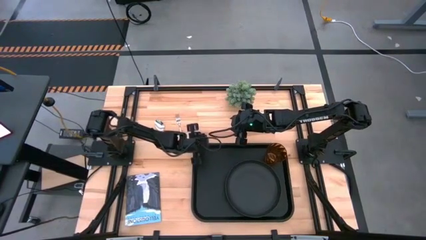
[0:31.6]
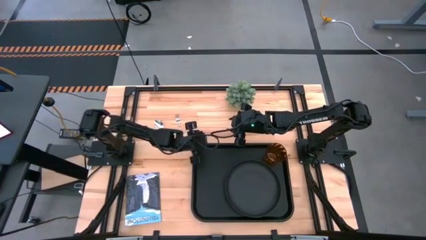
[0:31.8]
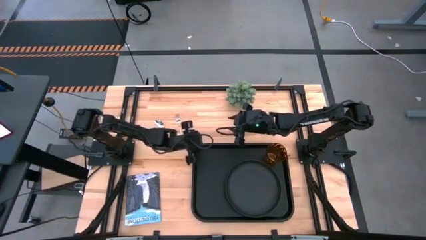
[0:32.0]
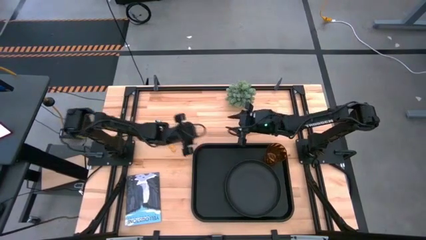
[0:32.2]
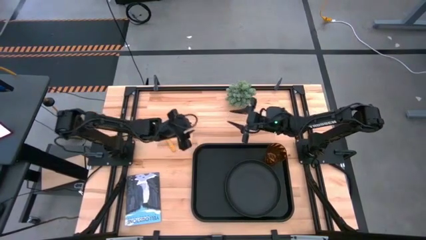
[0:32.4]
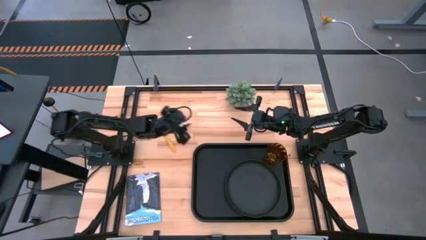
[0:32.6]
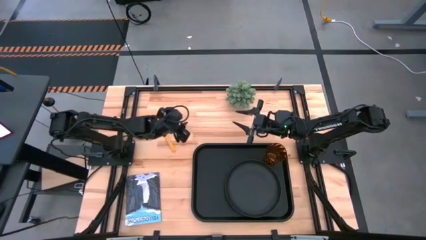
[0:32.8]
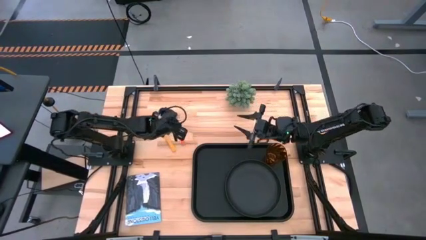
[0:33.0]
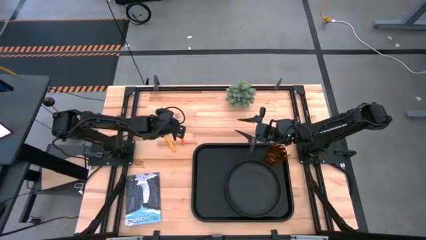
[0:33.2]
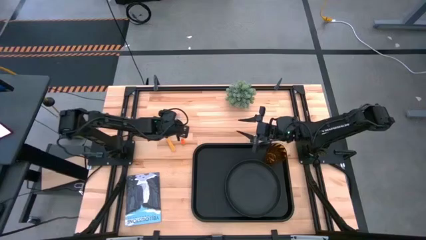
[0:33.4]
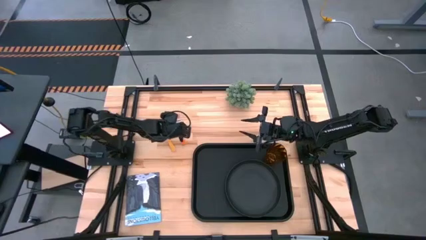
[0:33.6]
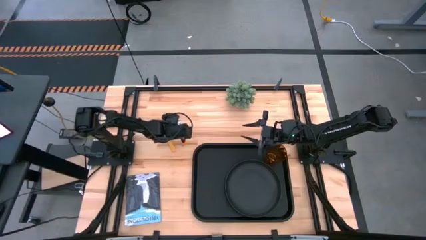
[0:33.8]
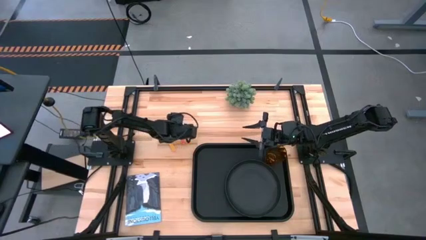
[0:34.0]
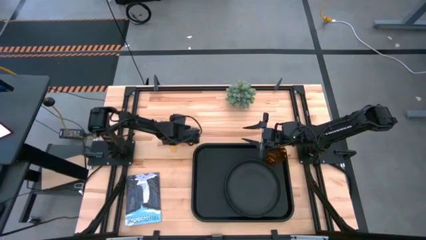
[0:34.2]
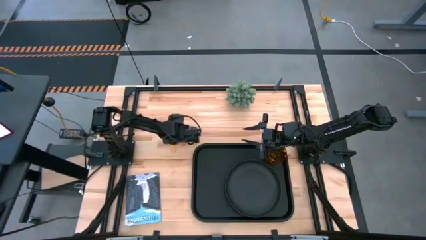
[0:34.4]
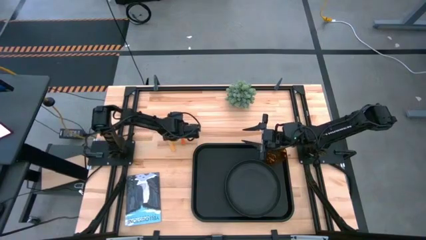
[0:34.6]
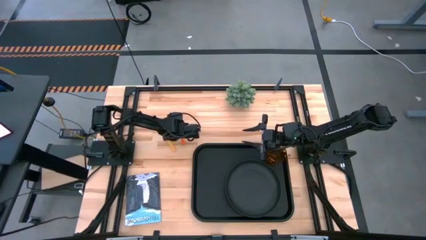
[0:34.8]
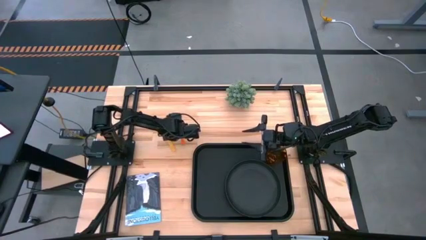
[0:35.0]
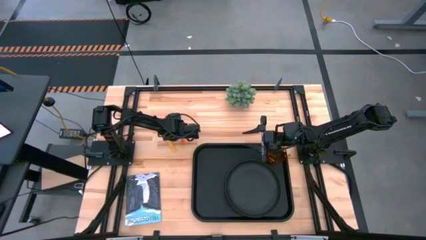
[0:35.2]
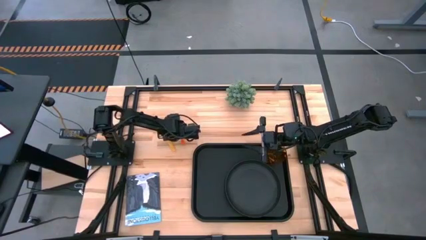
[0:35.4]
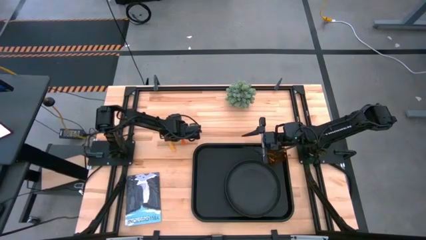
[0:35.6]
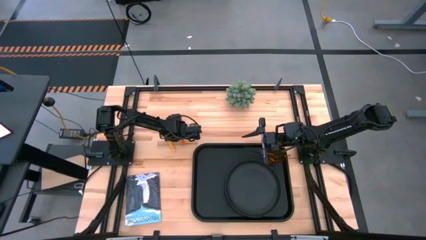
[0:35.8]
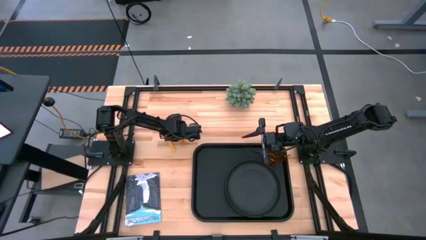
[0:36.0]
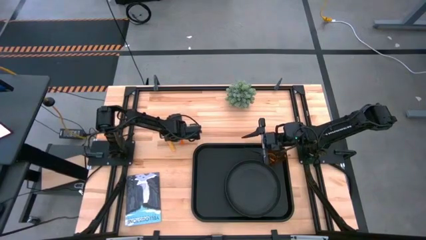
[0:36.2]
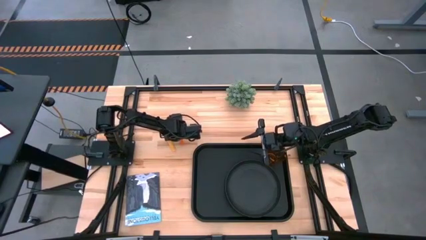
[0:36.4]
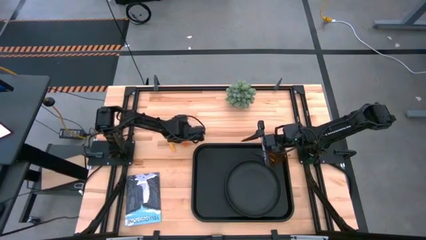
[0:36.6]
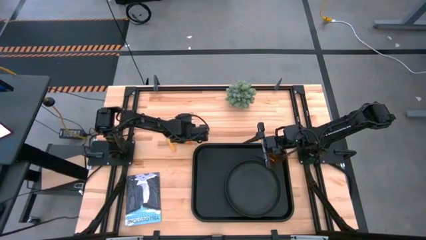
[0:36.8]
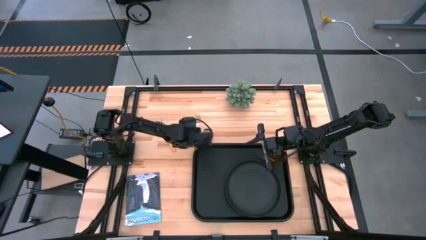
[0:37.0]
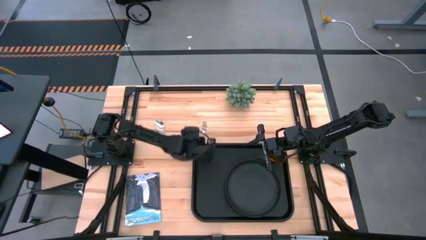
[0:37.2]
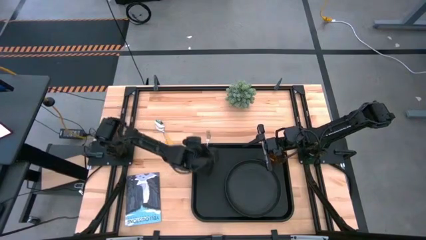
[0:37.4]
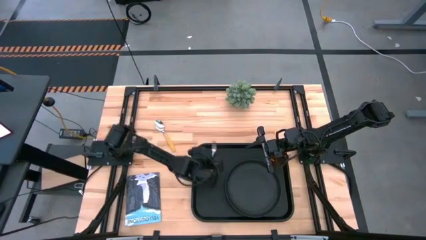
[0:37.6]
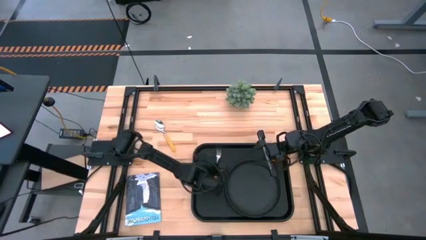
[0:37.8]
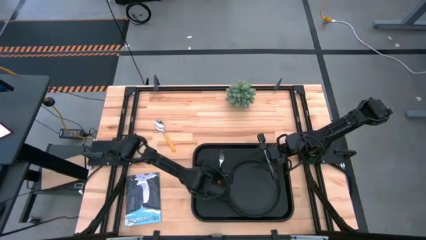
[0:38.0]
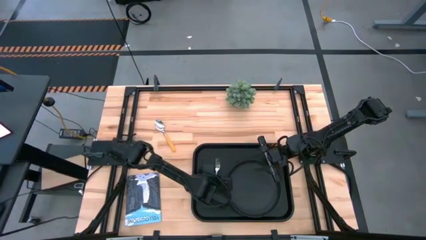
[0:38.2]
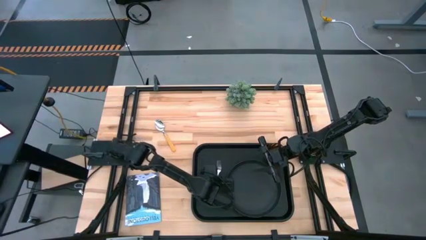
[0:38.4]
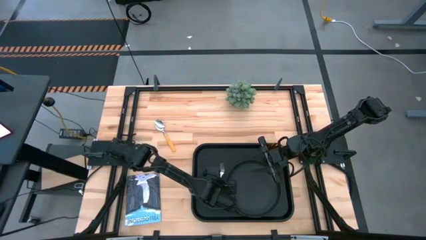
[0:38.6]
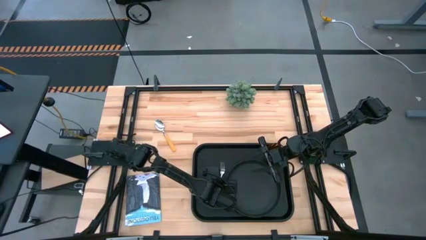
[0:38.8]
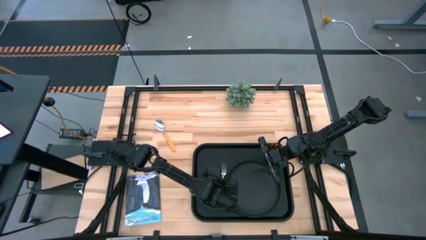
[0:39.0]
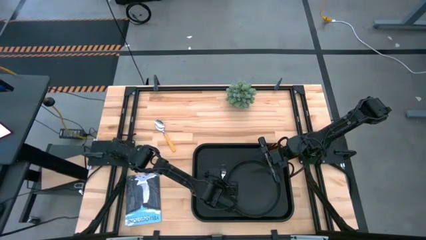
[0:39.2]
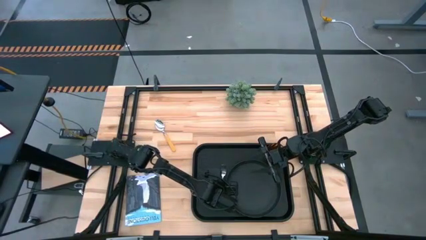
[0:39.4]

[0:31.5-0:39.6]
Task: Pick and place plate/cup/fork/spoon on tray
Put the orange fork on the black tray to the right of the plate

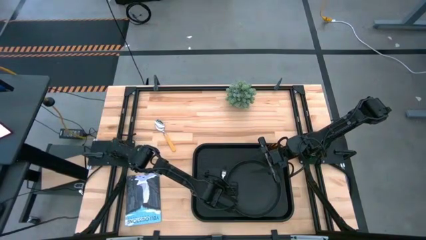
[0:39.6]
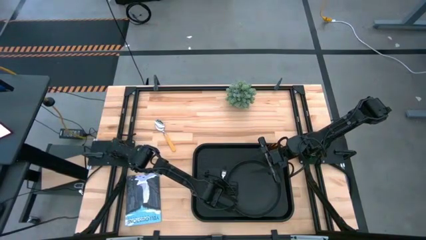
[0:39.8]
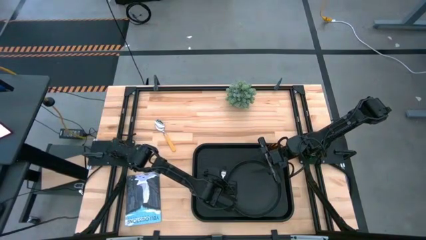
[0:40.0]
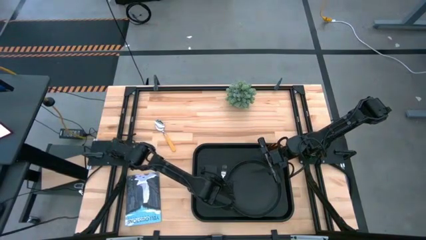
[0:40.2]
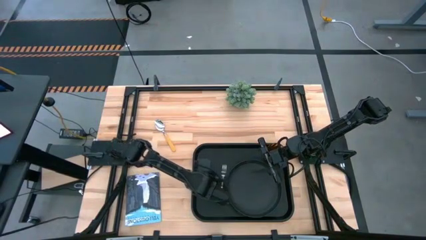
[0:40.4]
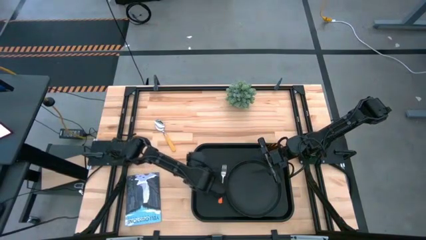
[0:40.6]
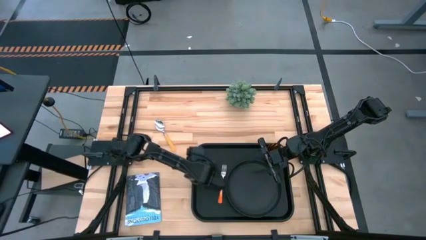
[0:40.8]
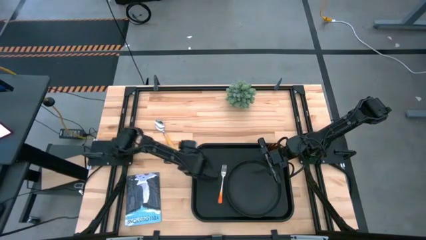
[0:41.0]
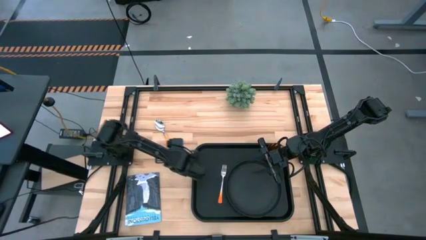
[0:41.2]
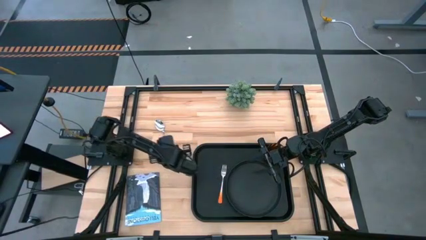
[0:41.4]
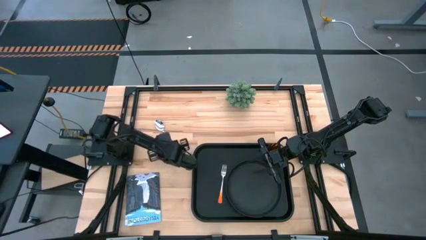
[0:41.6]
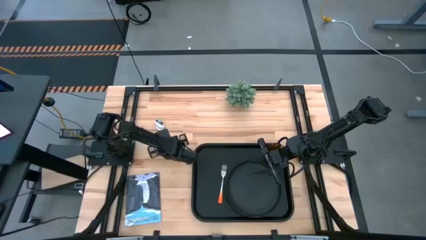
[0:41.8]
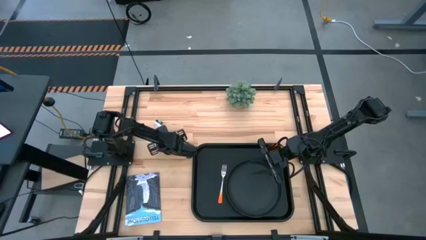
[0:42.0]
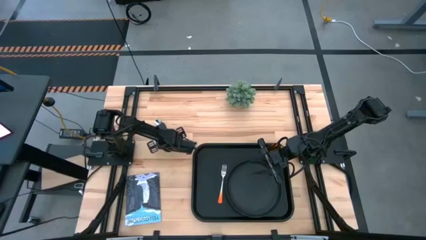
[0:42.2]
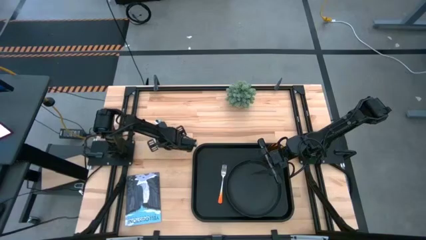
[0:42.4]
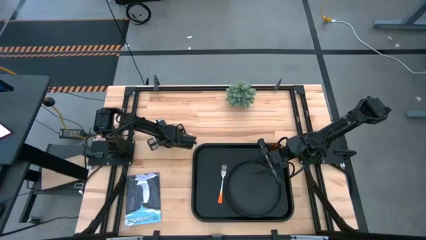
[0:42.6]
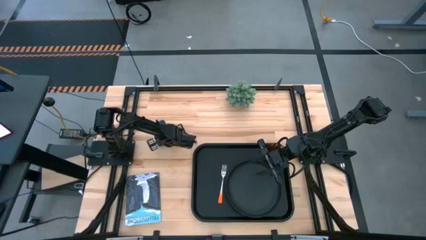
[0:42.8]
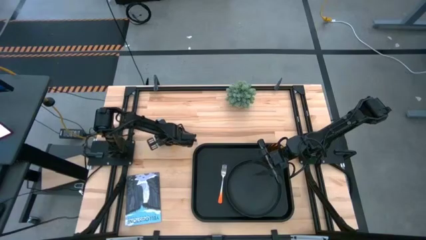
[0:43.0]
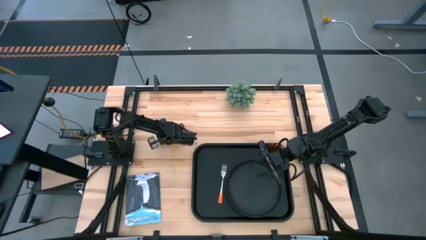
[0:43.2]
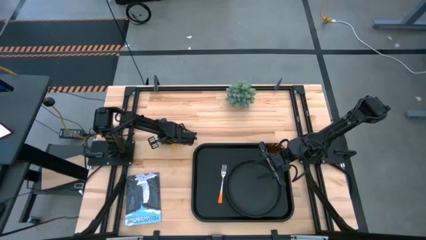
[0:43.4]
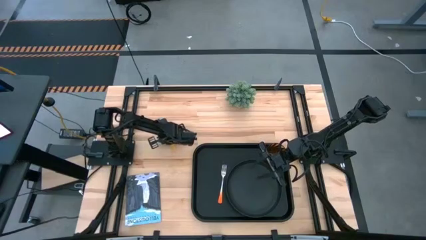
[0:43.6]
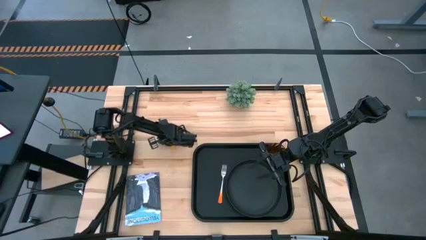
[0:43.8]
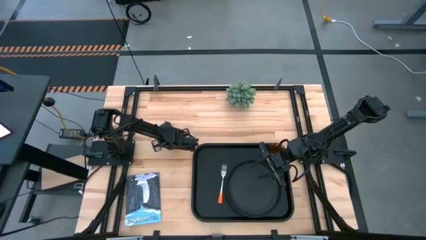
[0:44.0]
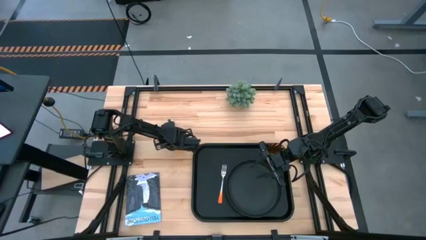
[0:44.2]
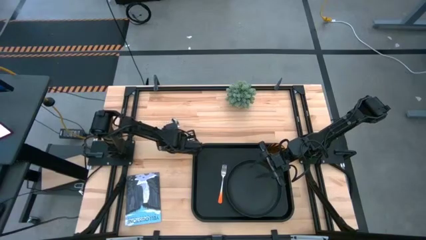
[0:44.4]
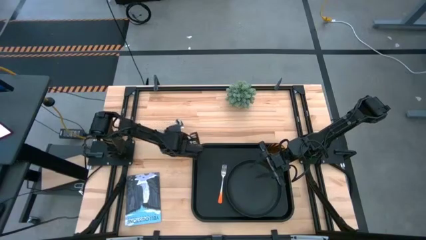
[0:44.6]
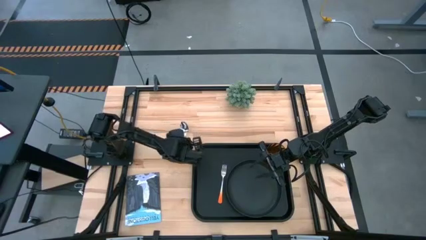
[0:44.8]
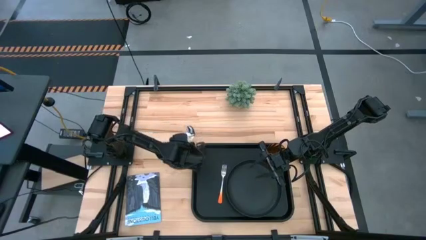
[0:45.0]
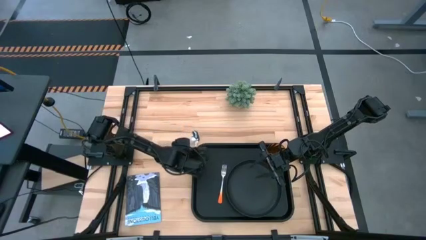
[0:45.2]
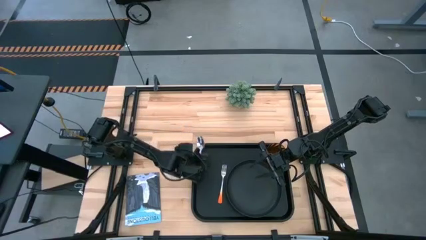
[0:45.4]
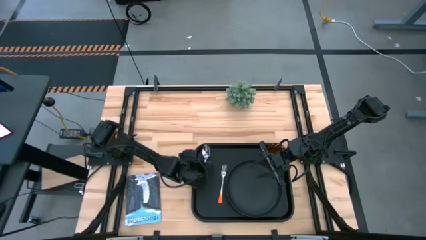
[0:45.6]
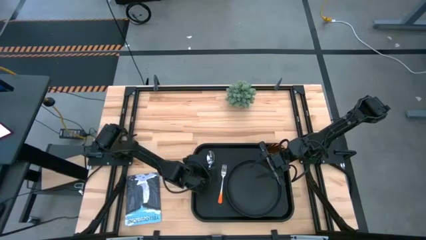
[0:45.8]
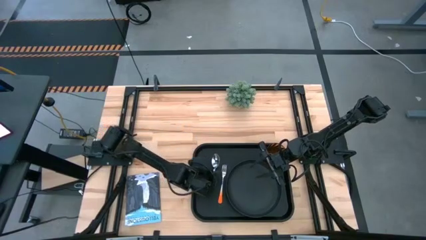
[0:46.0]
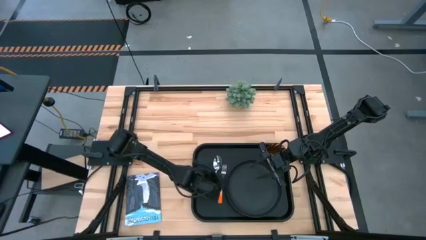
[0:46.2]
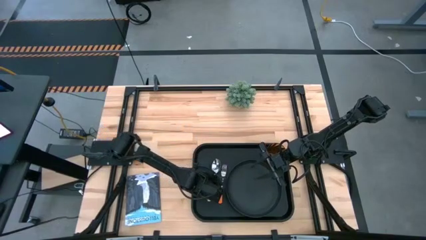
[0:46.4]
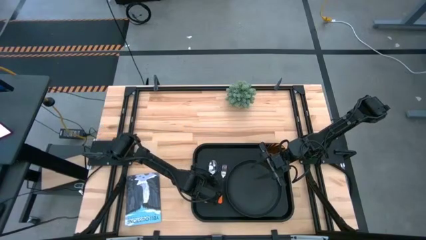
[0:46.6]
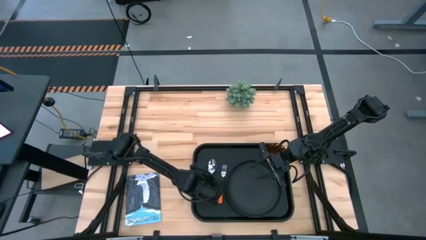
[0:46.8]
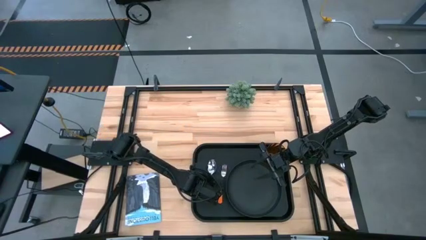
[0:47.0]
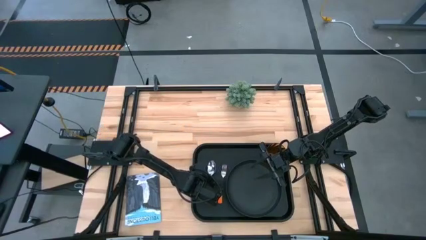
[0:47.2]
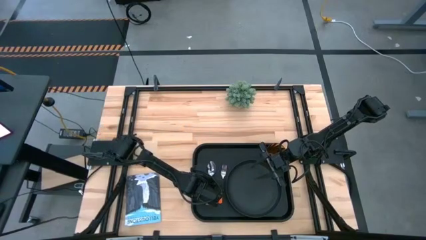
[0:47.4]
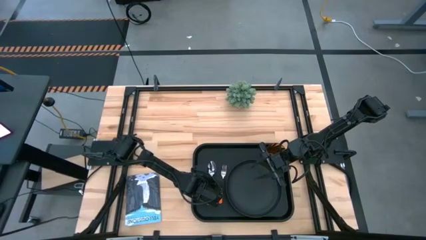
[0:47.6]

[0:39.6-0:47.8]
Put the orange spoon on the black tray to the right of the fork

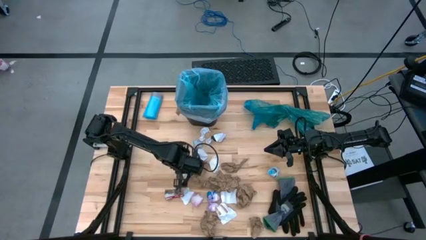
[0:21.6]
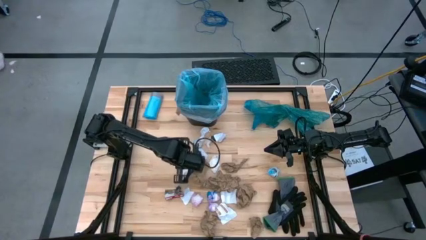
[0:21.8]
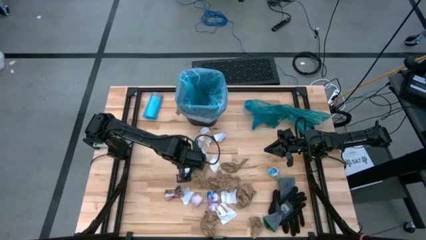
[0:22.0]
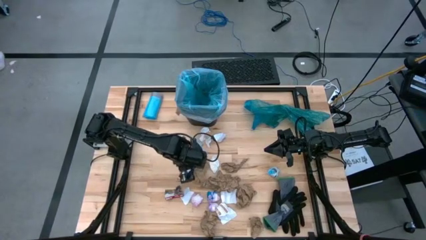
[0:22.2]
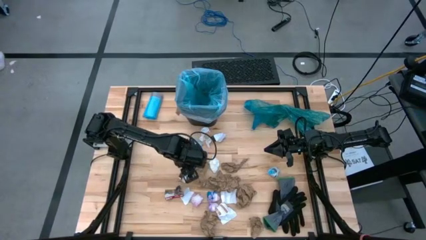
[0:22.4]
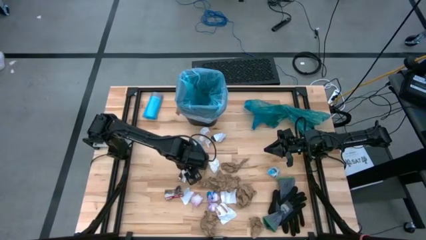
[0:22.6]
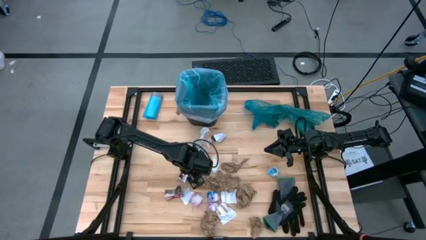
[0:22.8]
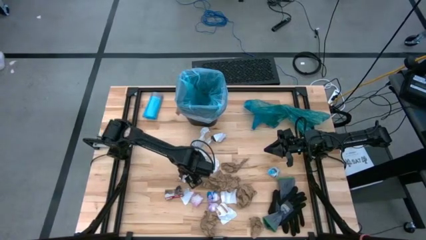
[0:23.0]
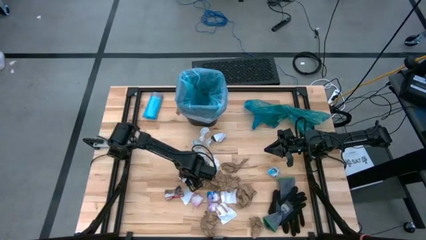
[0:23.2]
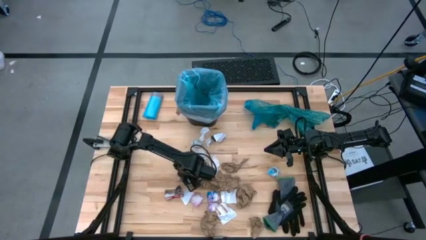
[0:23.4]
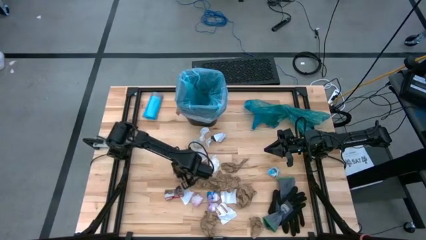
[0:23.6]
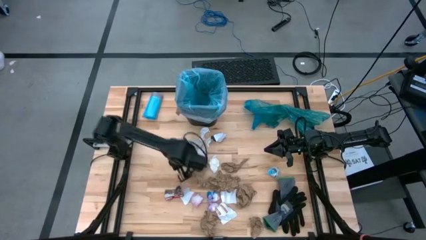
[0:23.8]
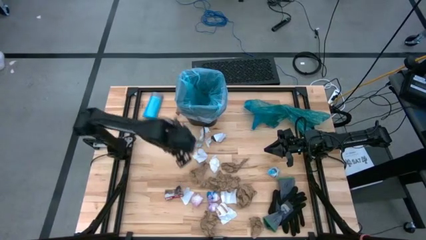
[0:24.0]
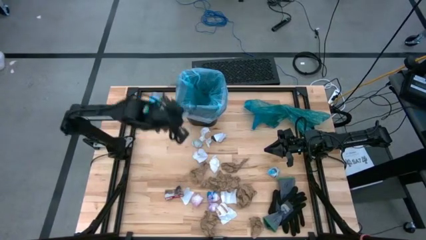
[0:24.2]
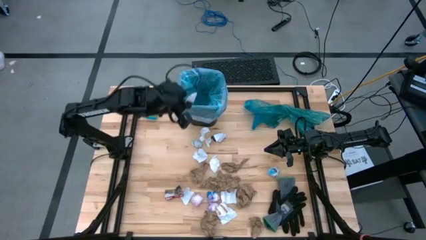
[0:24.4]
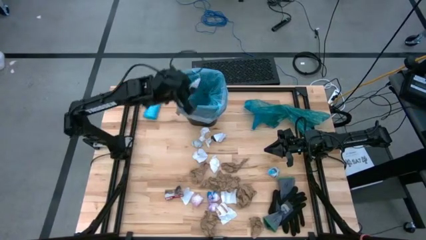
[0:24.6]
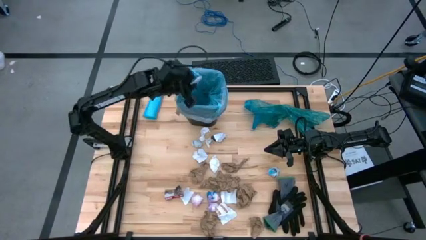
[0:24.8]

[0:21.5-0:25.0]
Task: place trash/remove bag and relplace
Put the white paper trash into the trash bin
